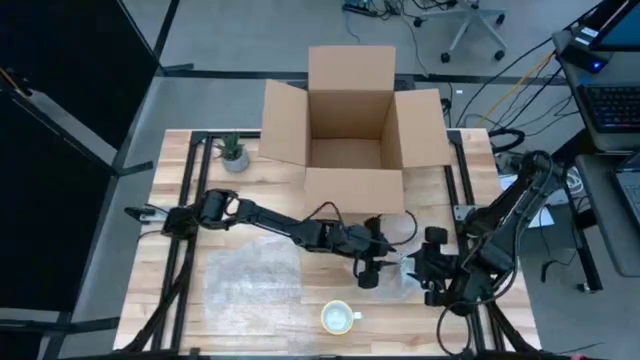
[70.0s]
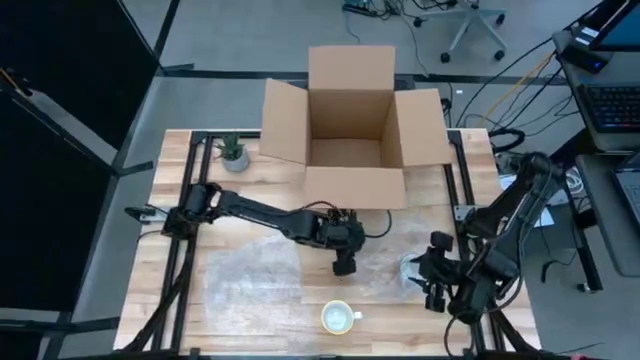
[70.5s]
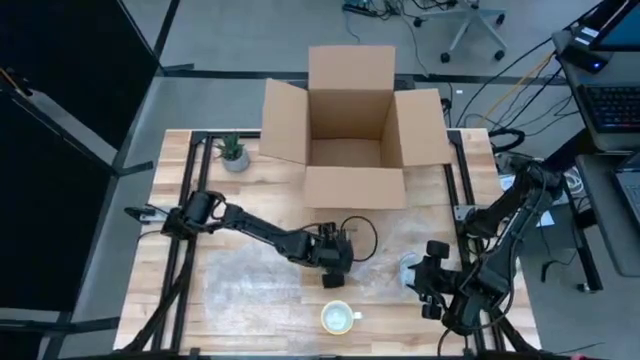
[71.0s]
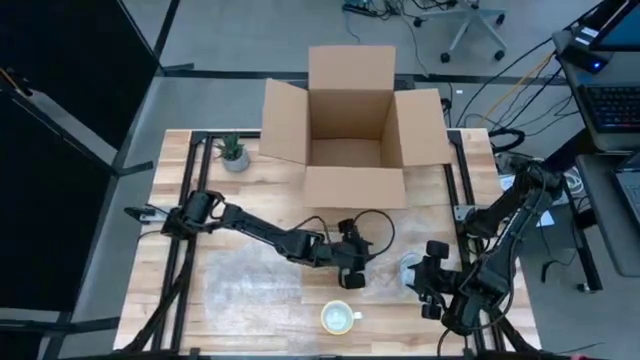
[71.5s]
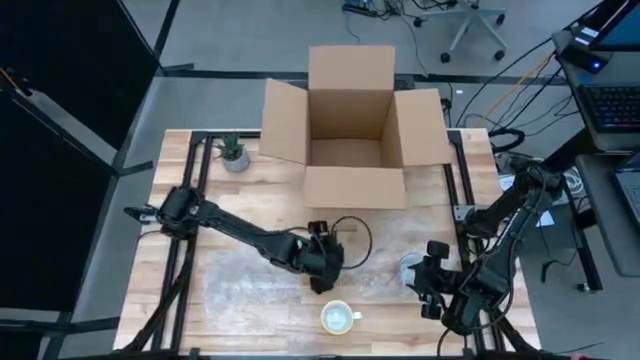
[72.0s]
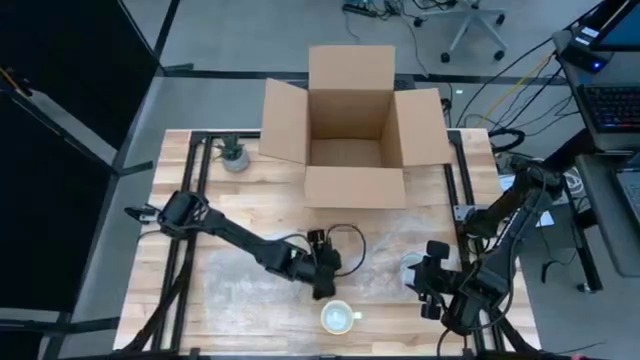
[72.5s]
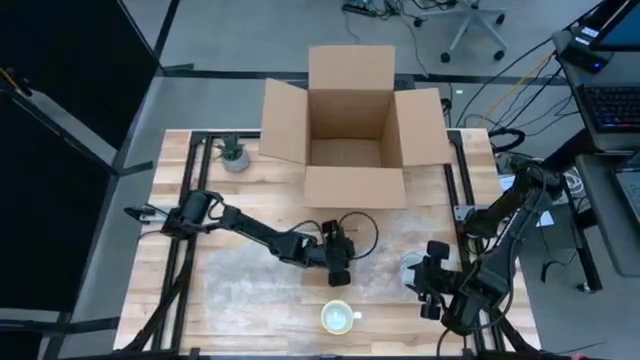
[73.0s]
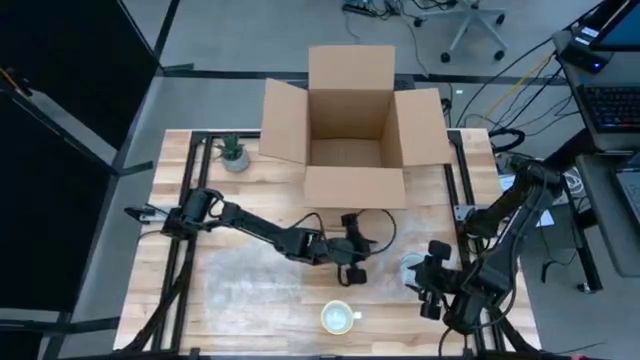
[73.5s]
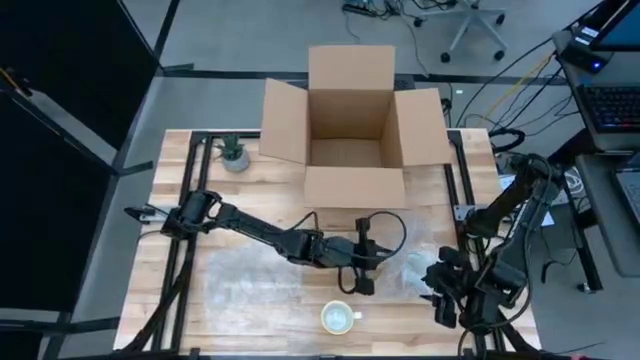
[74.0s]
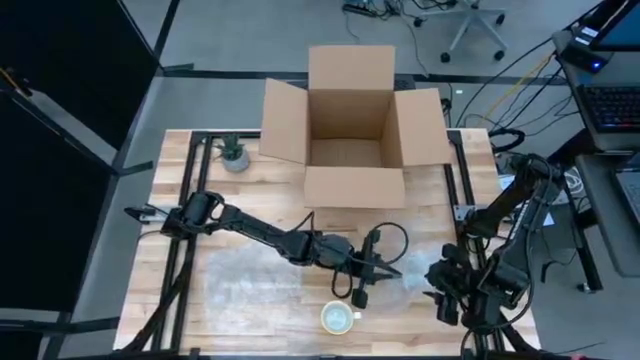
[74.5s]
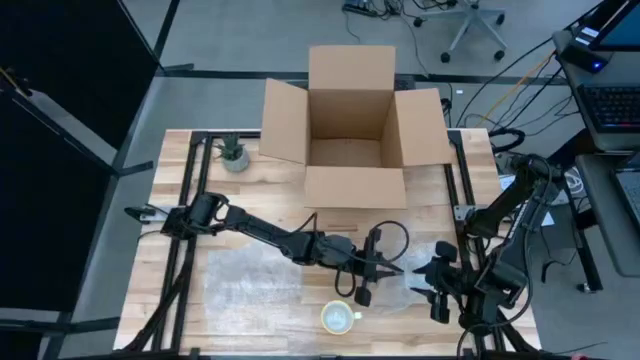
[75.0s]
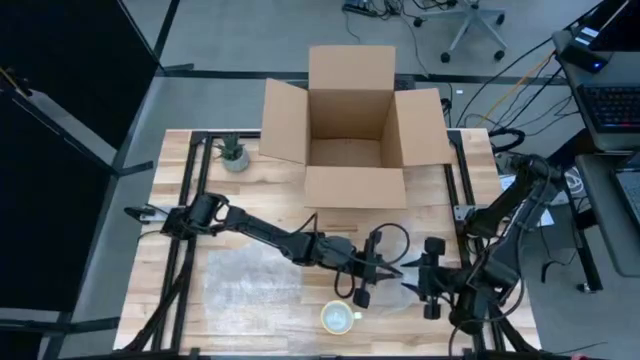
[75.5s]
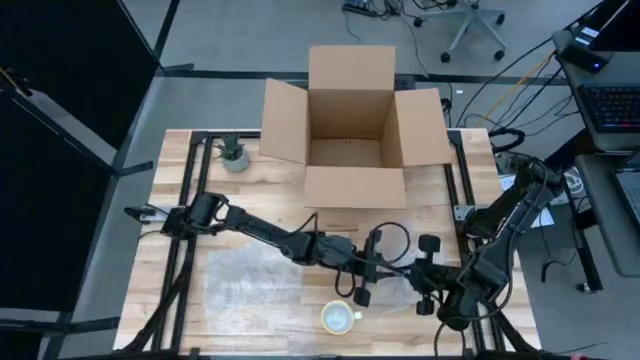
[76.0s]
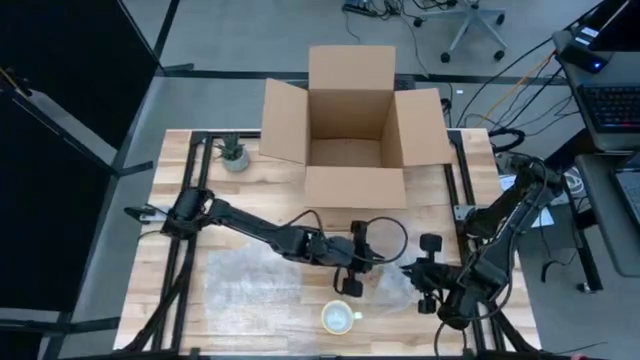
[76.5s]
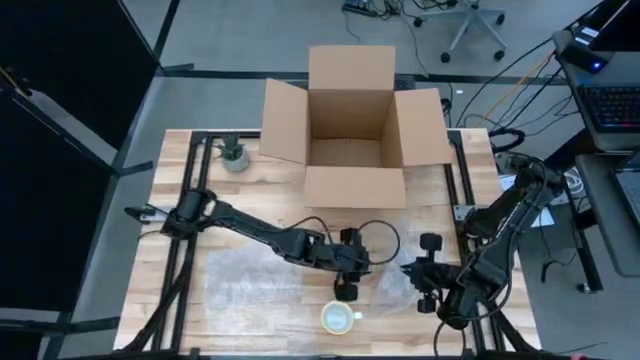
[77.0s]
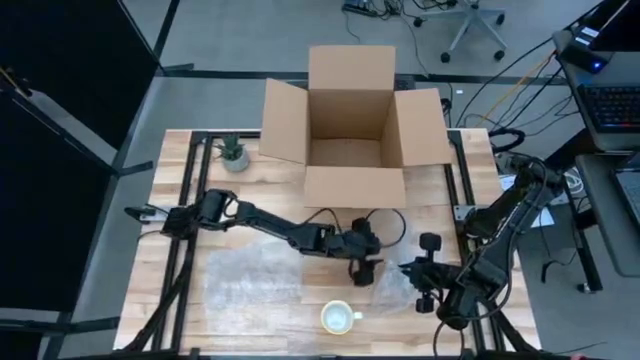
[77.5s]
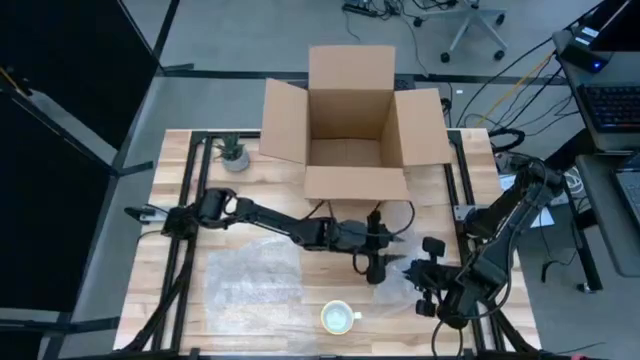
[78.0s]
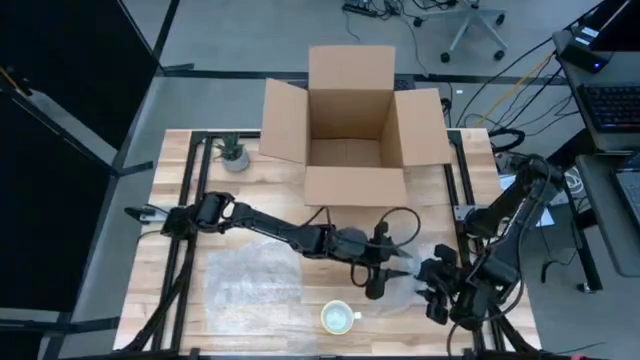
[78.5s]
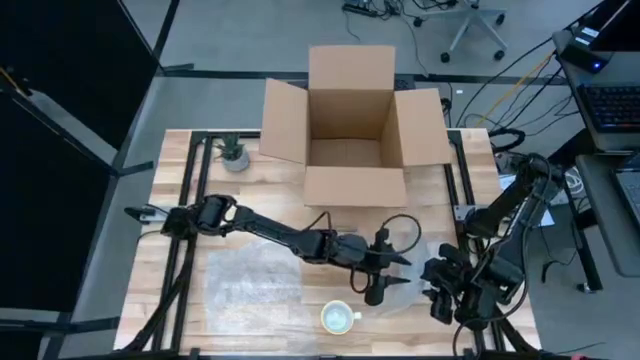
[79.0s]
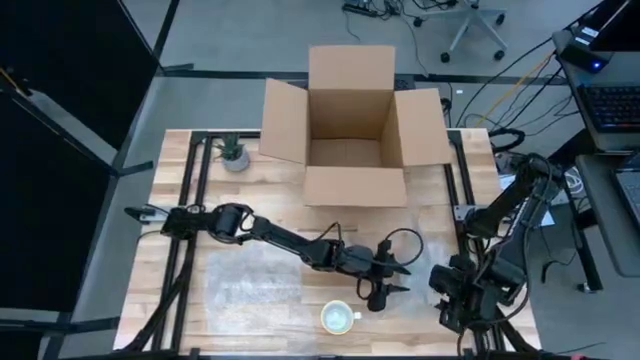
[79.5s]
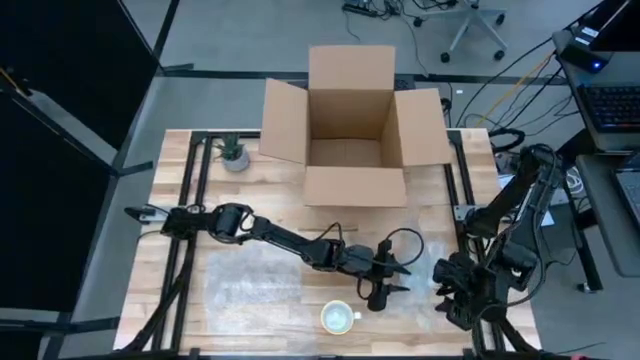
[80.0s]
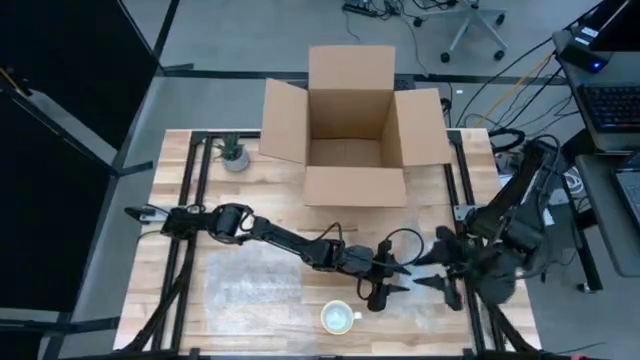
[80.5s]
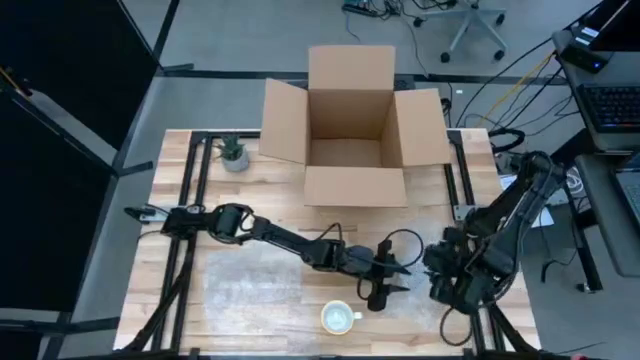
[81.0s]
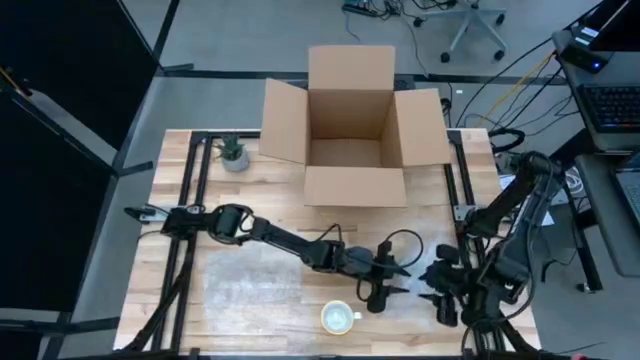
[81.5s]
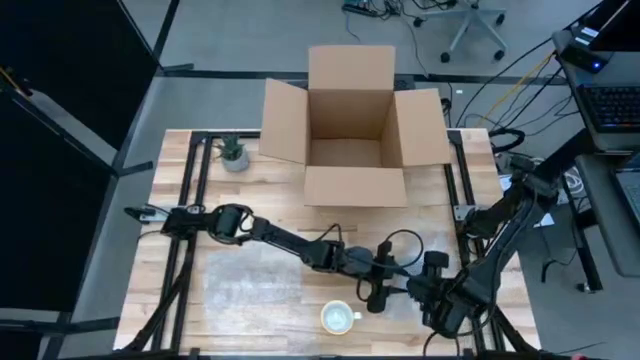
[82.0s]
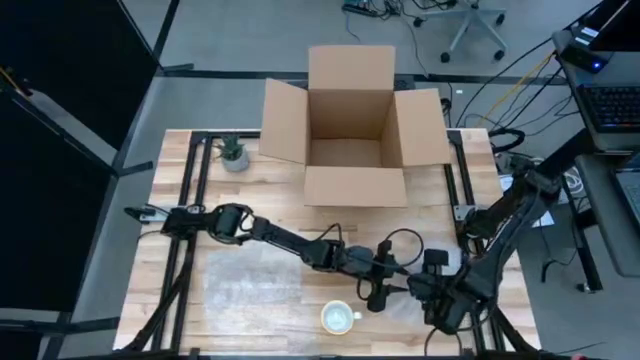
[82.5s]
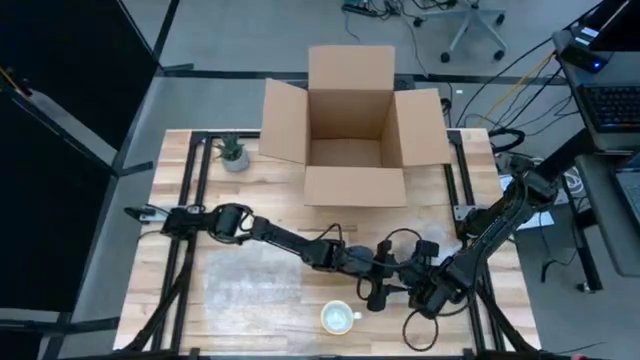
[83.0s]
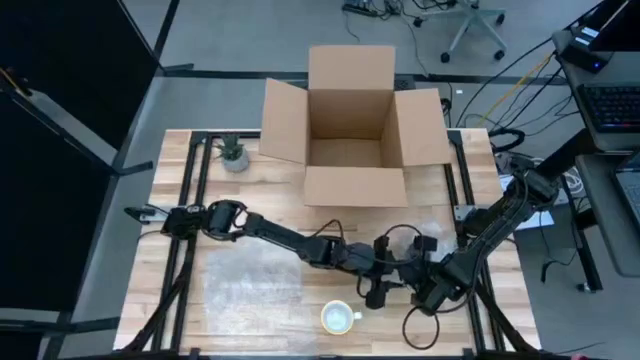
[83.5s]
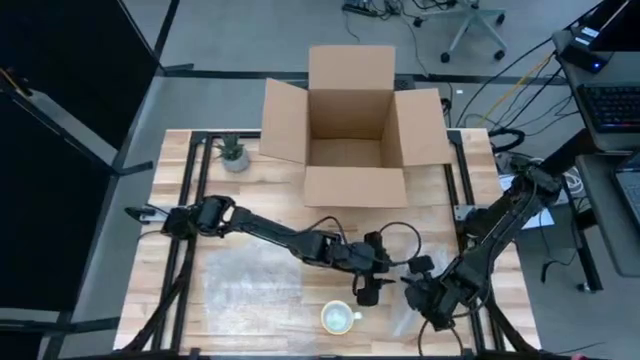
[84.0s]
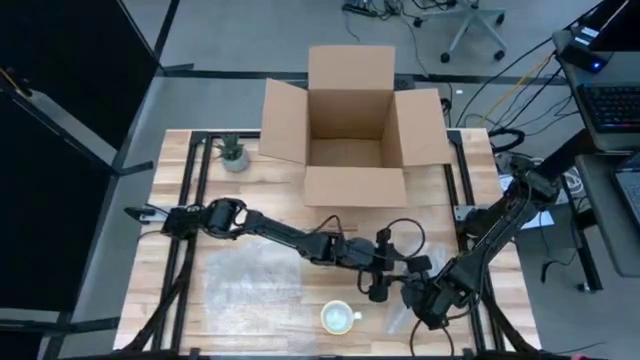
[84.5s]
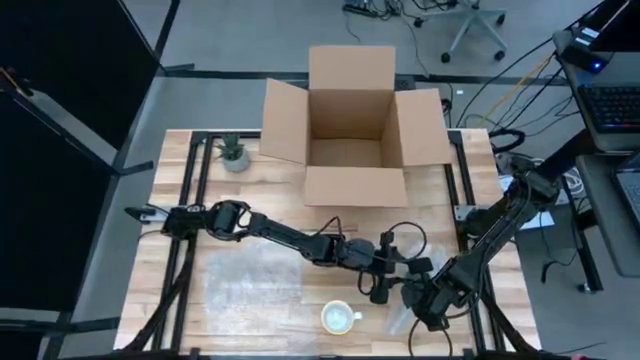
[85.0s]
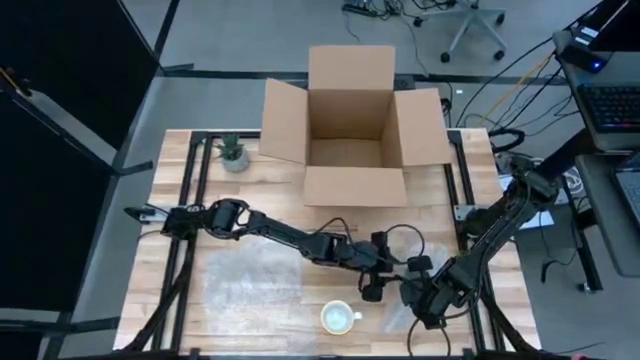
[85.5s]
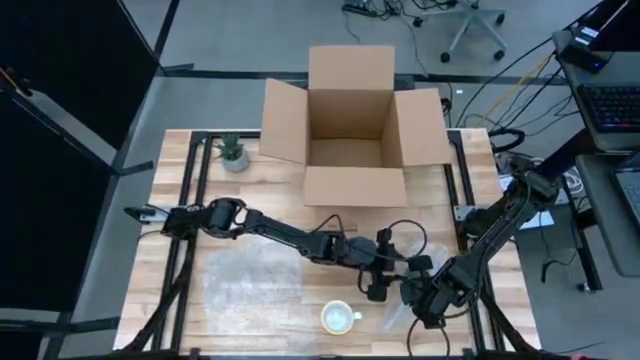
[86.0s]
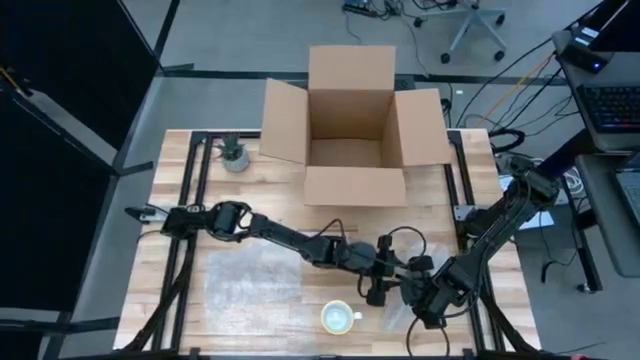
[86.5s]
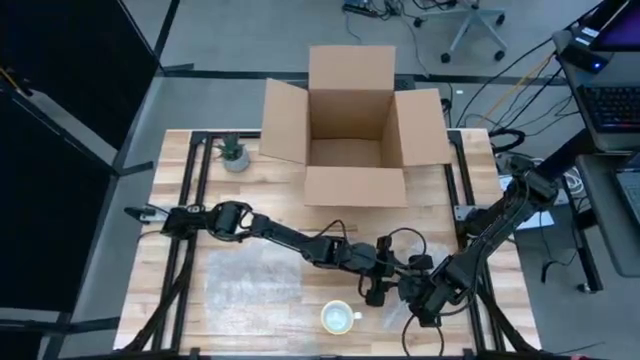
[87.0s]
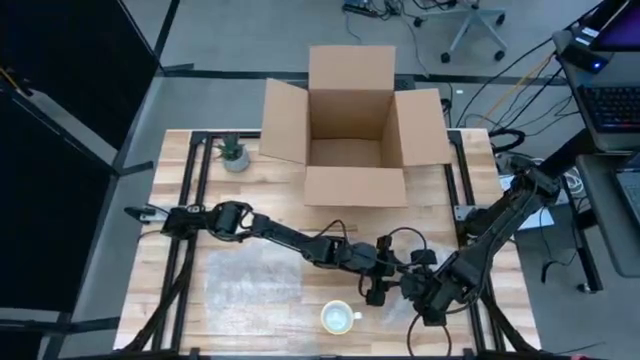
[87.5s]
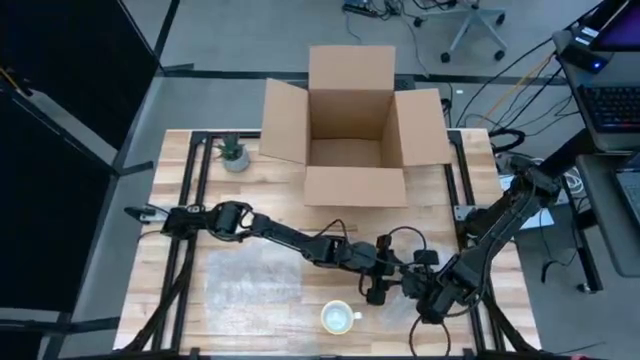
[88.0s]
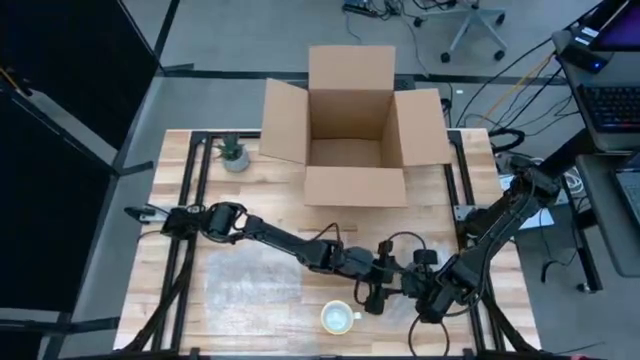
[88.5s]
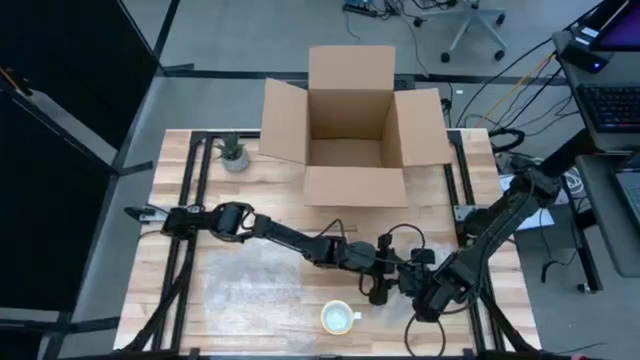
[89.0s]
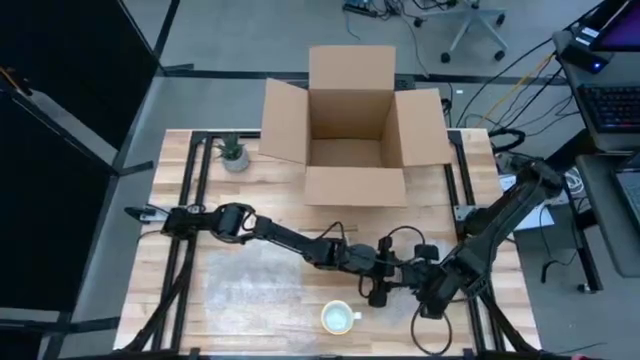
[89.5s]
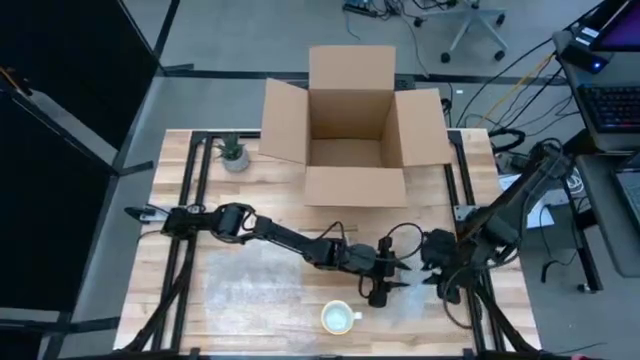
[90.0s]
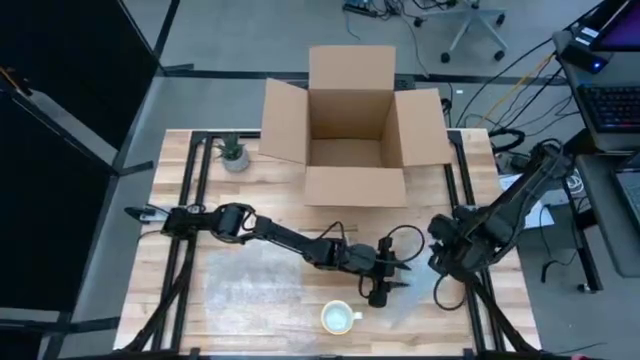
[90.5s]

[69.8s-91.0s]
Task: wrap mug
Wrap the red patterned mug with bubble wrap

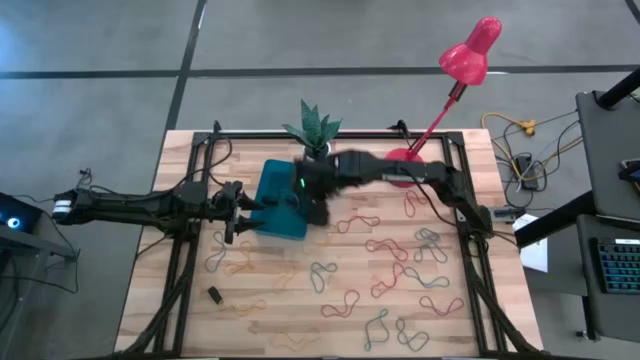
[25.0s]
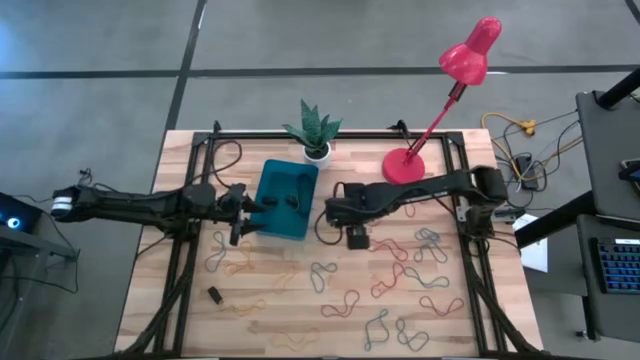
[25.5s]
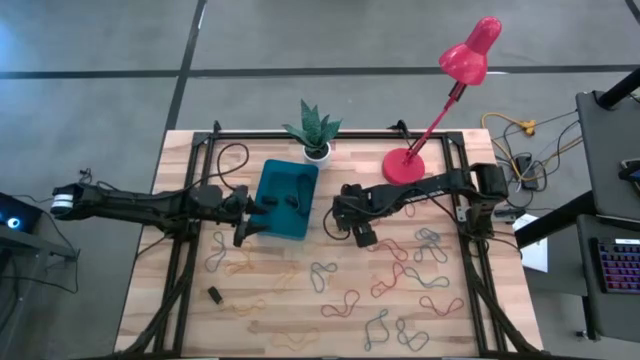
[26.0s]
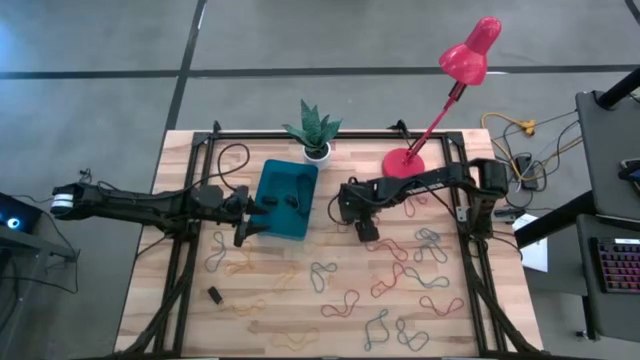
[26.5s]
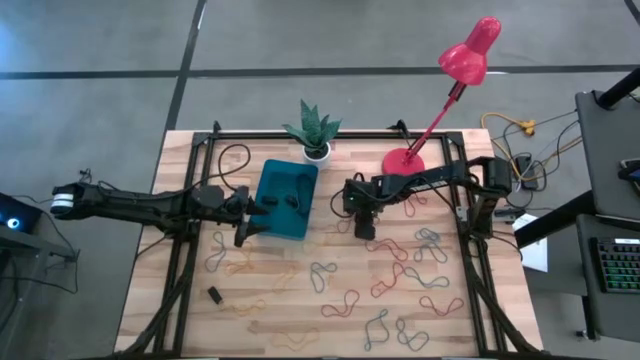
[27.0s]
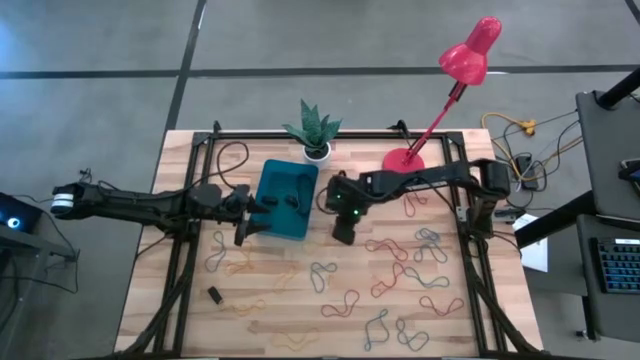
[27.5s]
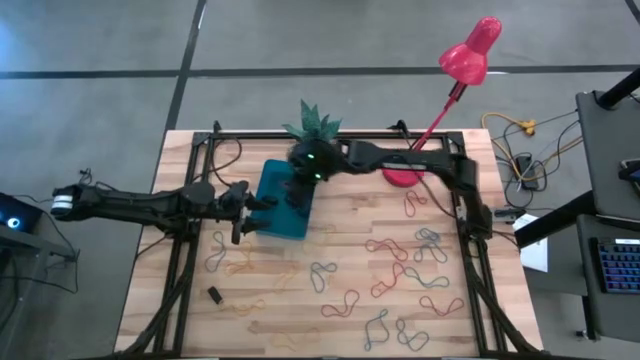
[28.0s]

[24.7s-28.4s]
Task: Pick and place rubber bands into bin
Put the orange rubber band into the blue bin
